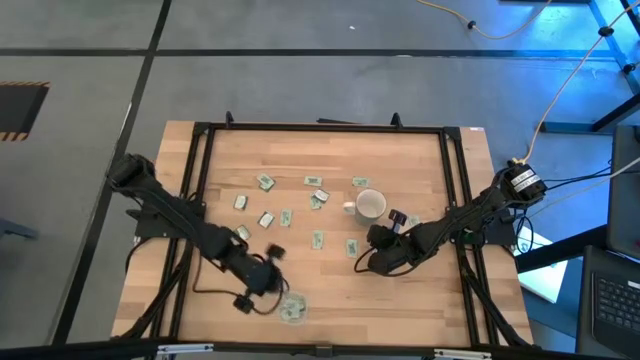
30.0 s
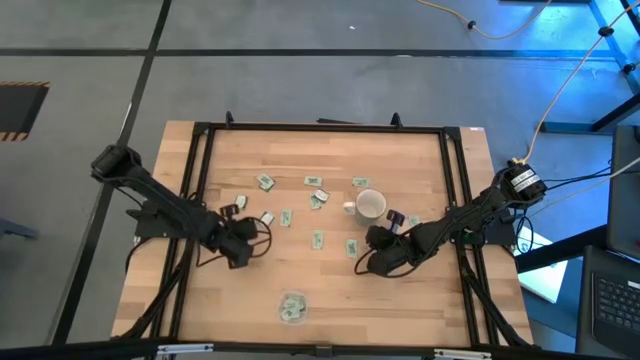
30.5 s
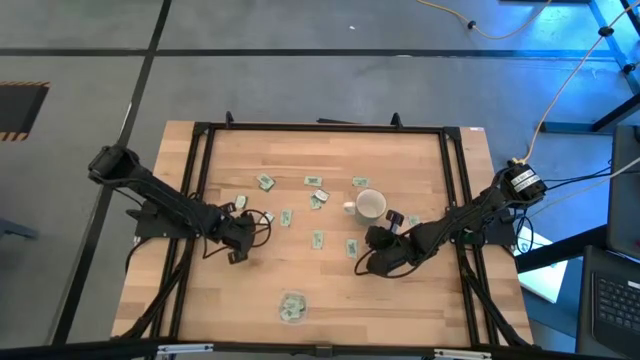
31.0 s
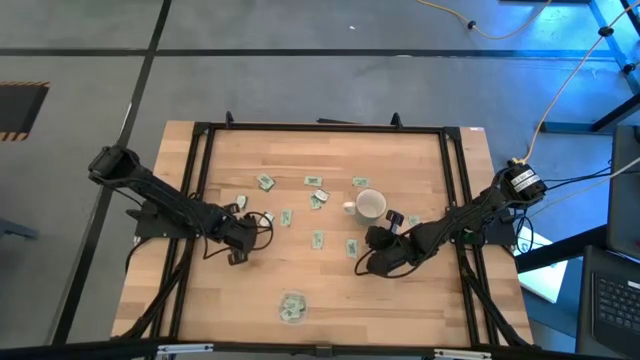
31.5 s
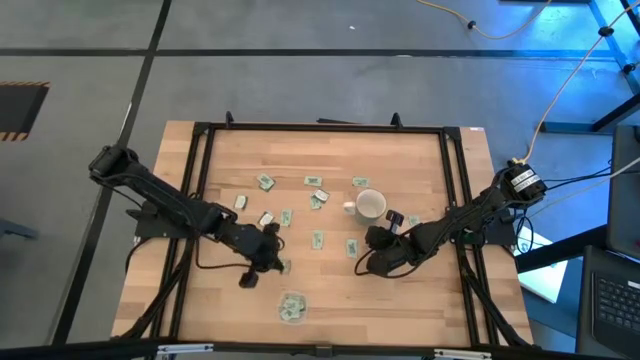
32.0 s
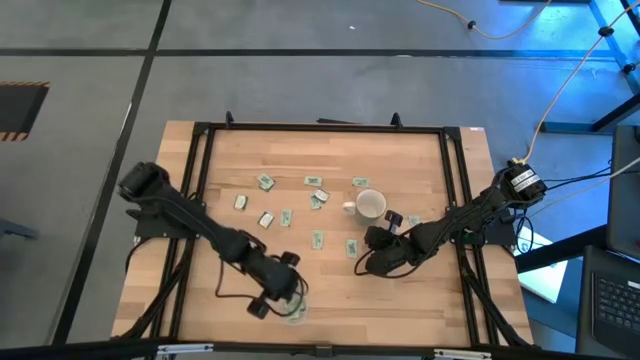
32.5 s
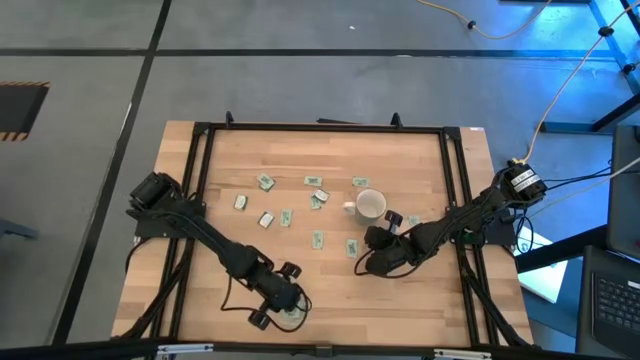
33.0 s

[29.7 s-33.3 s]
Task: Pick and place Stevia / Truvia into bins
Put the green stevia packet into the transparent bin

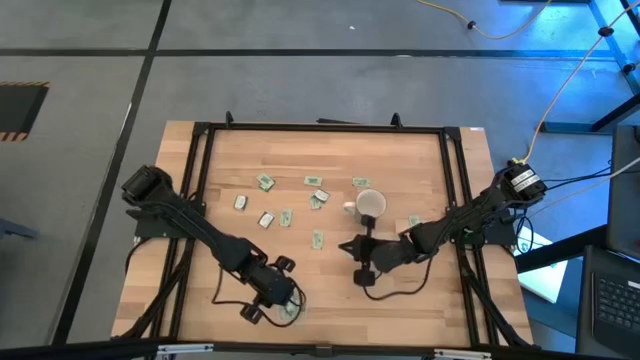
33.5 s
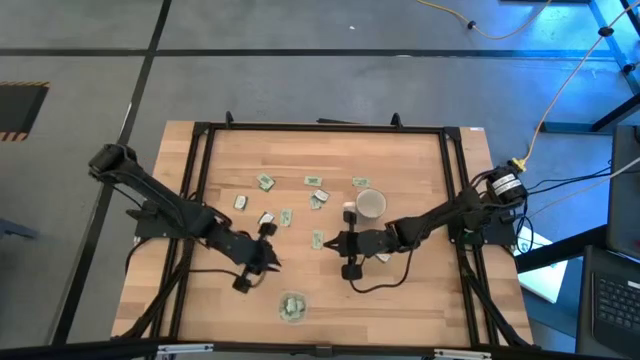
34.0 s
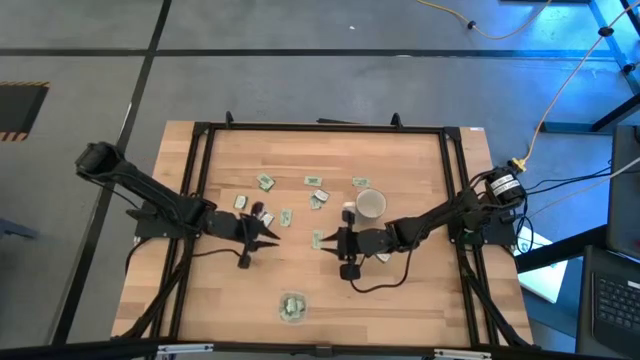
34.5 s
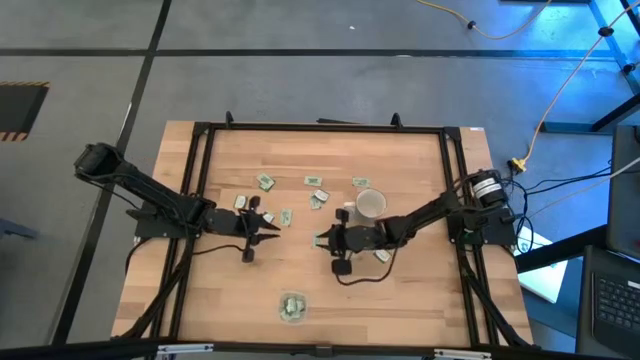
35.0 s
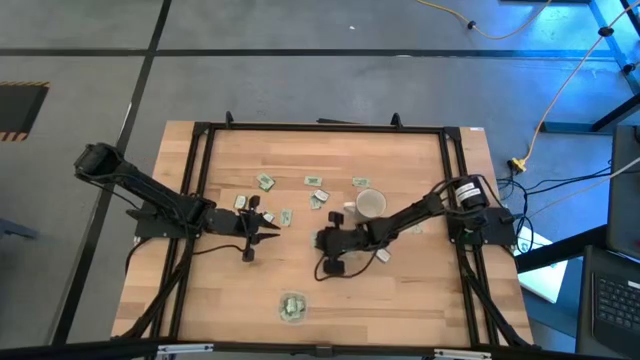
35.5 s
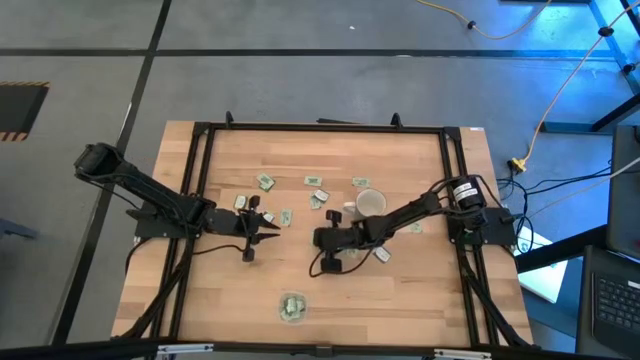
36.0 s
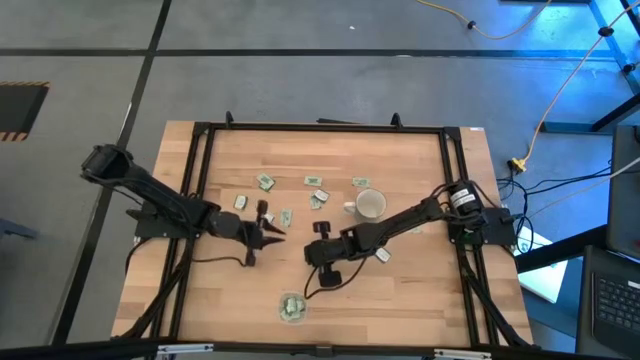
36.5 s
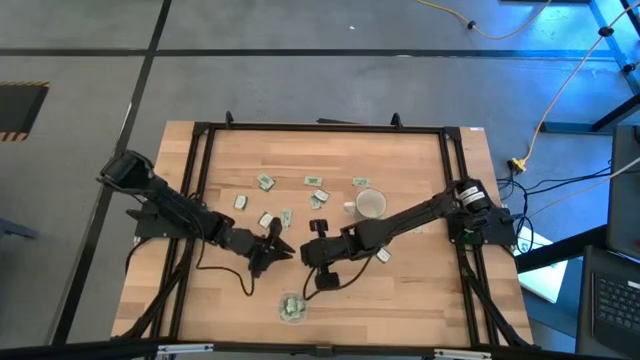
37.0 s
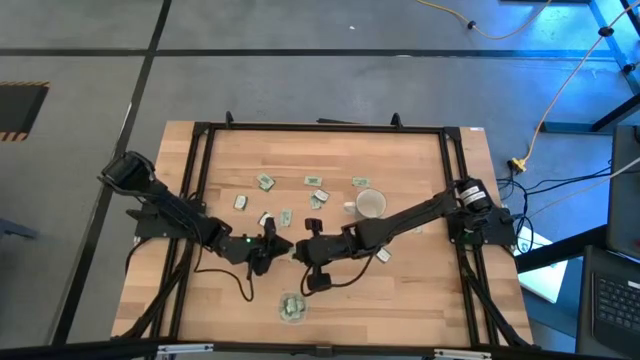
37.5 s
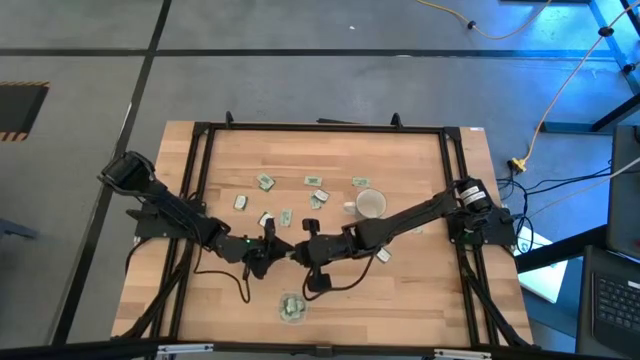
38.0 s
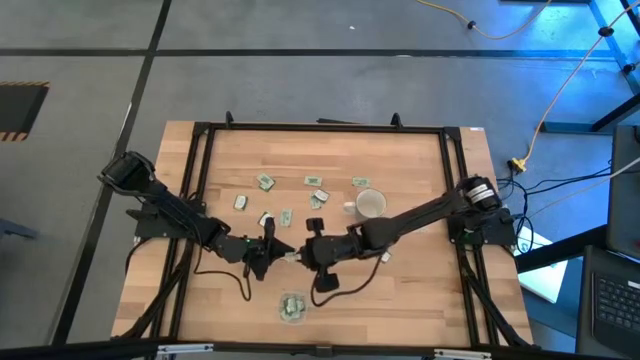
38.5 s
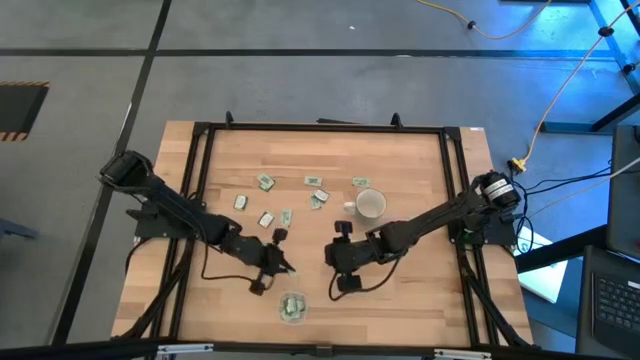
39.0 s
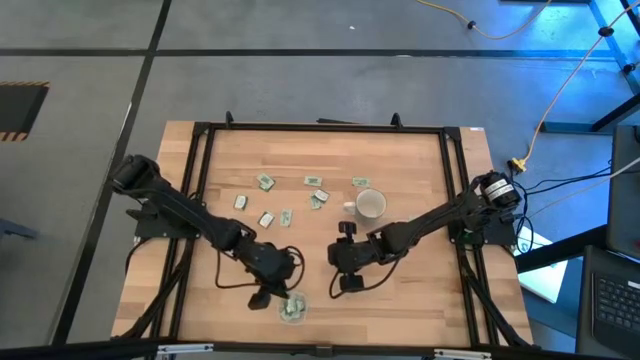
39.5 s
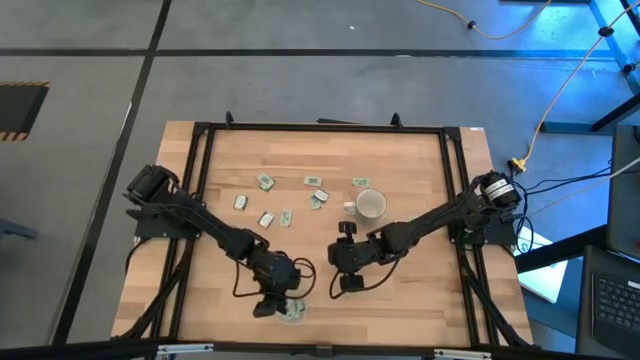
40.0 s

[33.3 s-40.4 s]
Put the light green stevia packet into the transparent bin

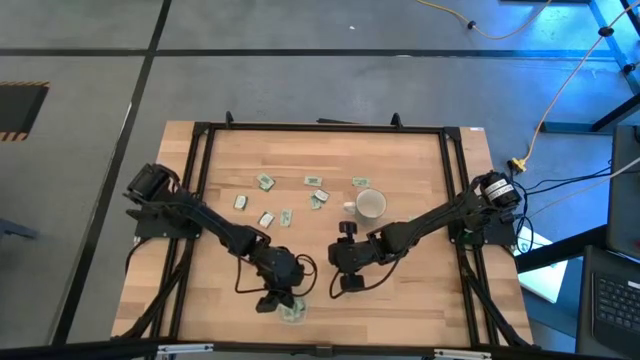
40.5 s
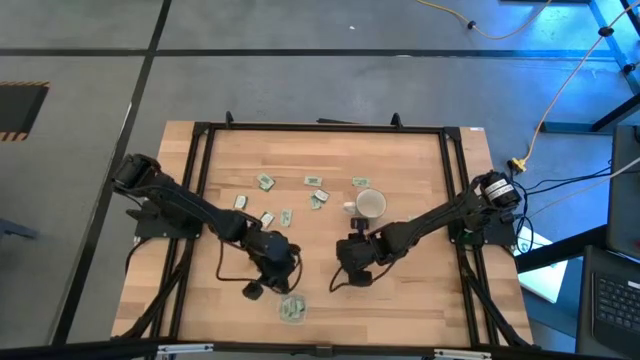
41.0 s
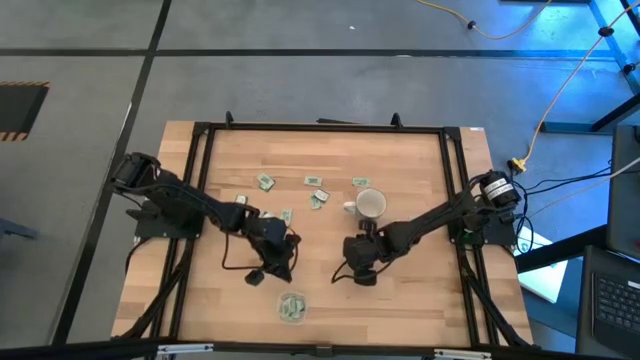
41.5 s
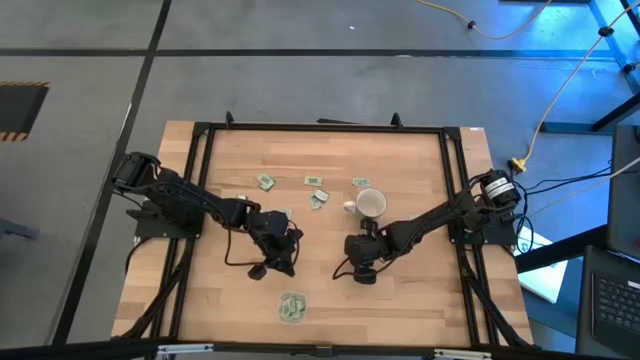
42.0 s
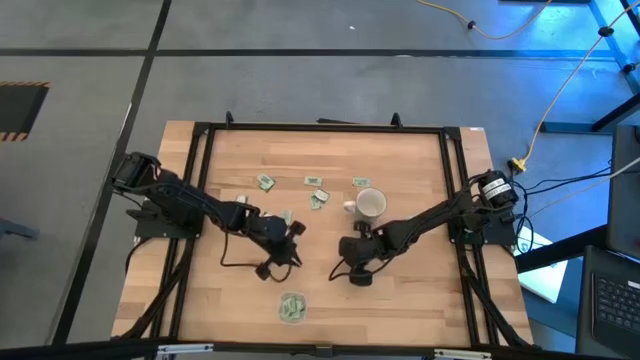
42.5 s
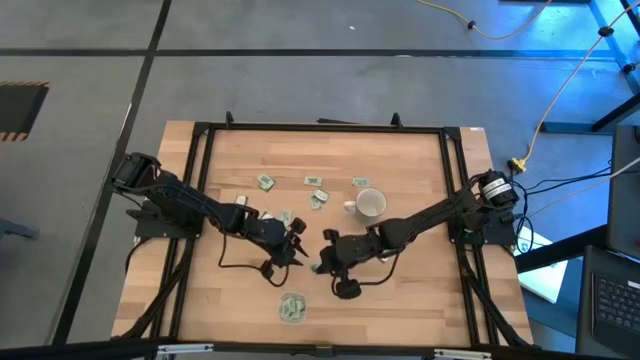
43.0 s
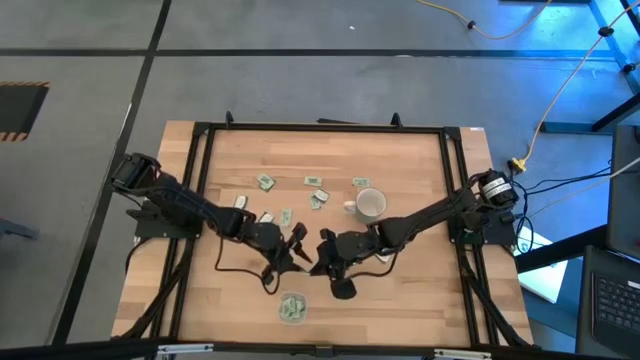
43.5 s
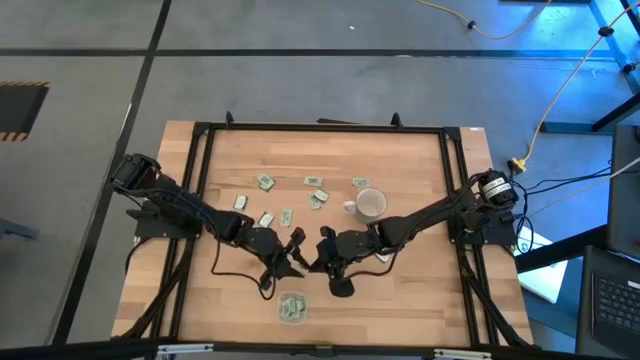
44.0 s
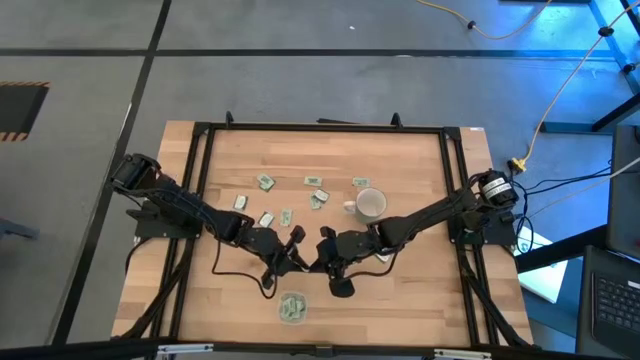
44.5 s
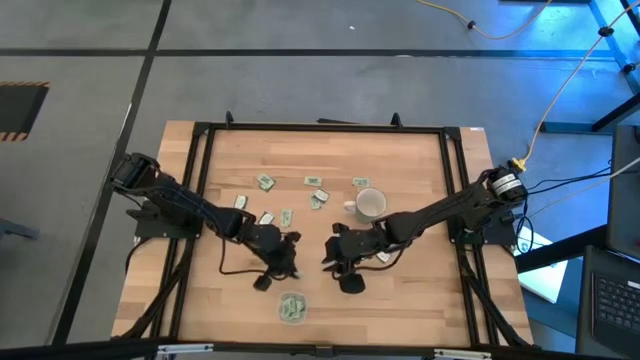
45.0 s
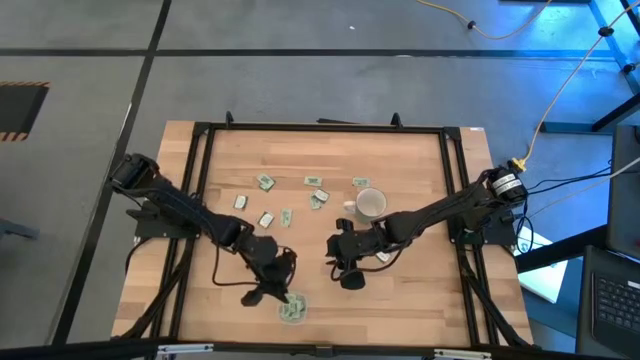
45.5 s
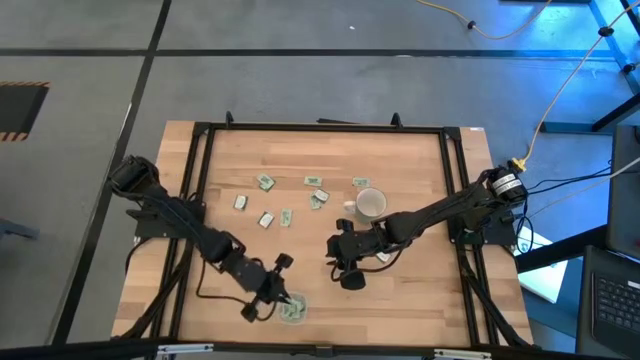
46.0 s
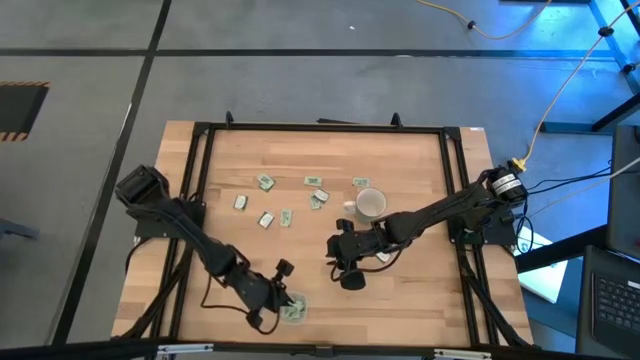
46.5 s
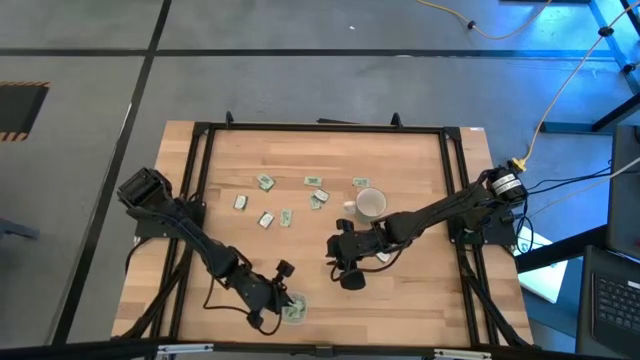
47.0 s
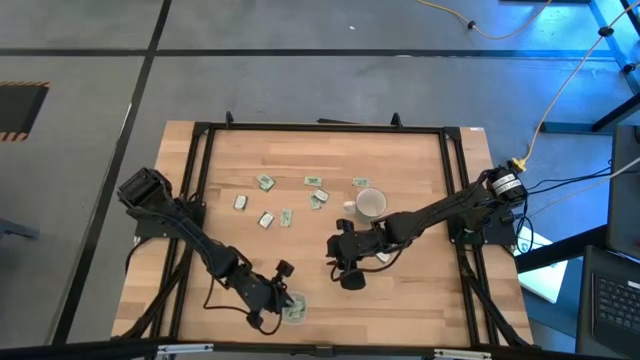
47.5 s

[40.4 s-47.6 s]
Put the light green stevia packet into the transparent bin

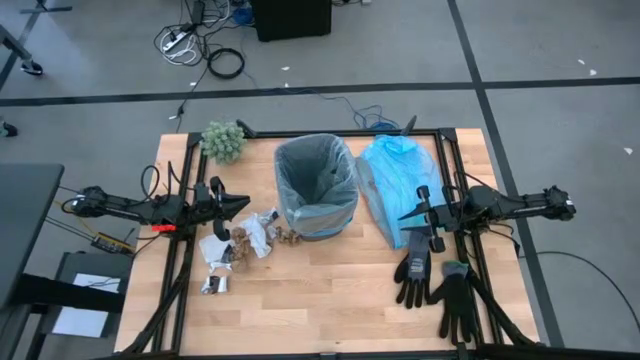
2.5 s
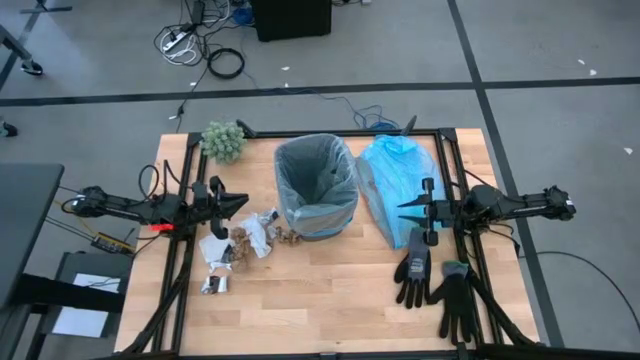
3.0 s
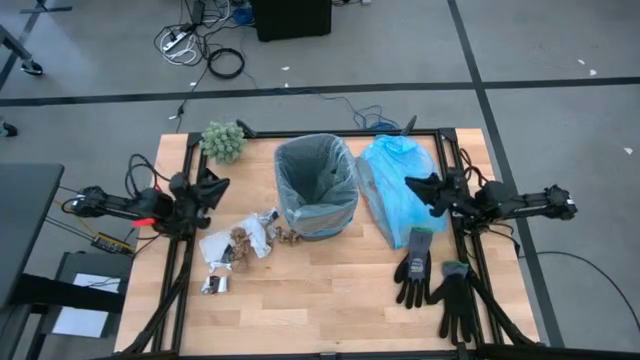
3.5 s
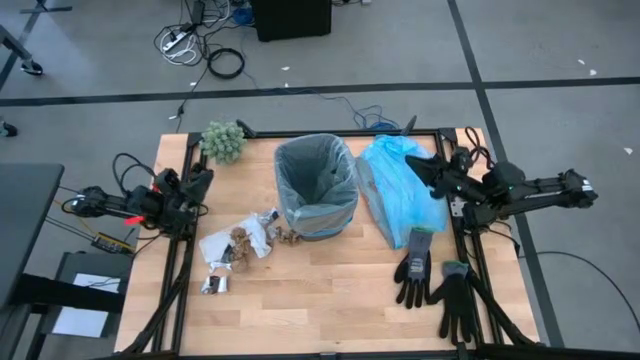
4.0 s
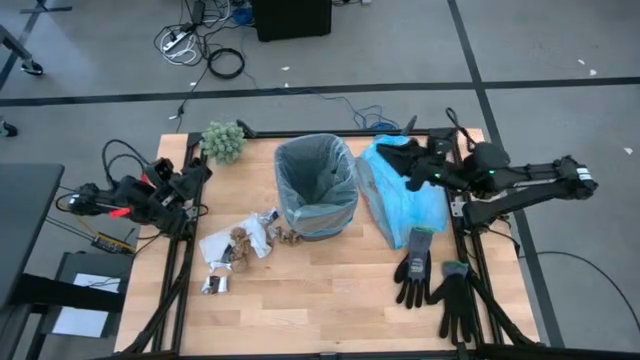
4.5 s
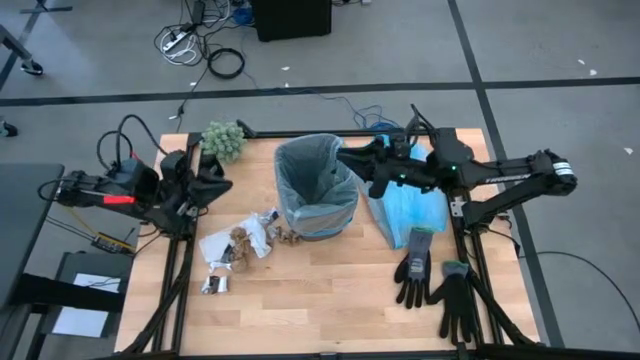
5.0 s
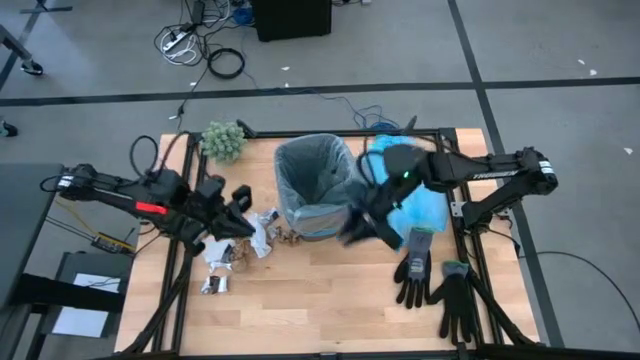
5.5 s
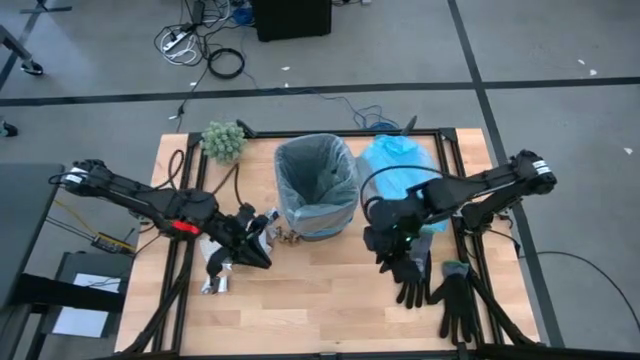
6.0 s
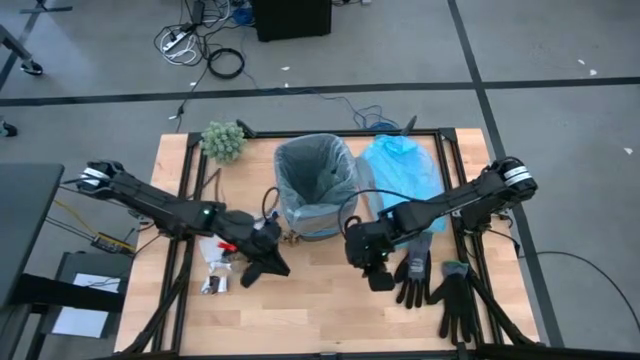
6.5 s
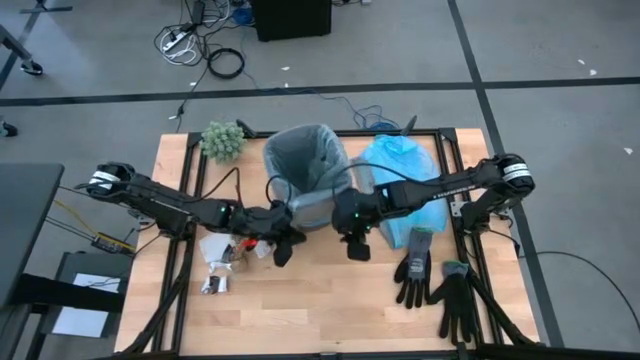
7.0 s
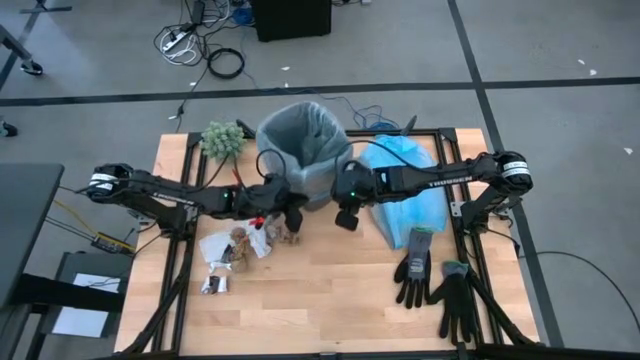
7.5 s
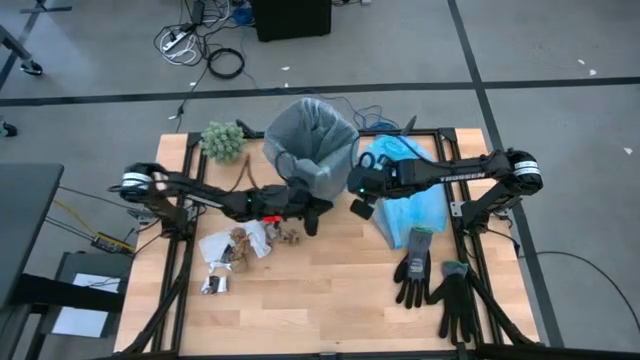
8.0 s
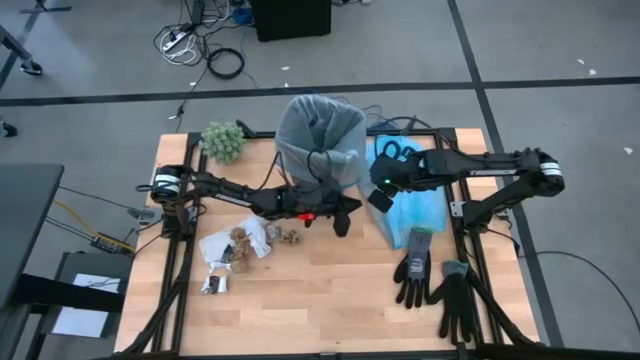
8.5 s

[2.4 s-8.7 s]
Task: place trash/remove bag and relplace
Move the trash bin to top of the table
